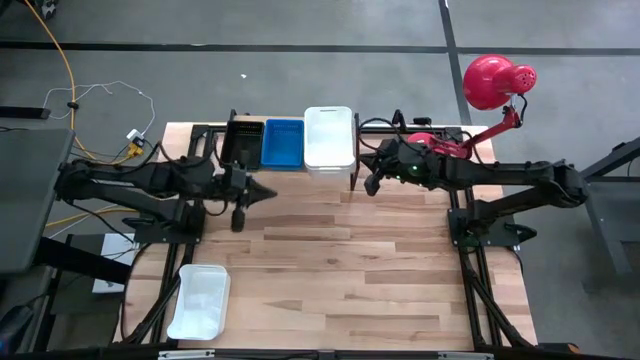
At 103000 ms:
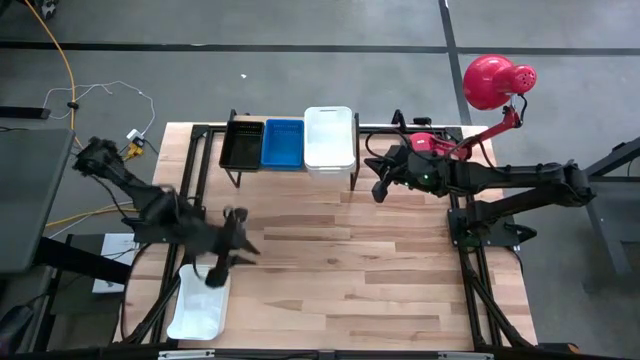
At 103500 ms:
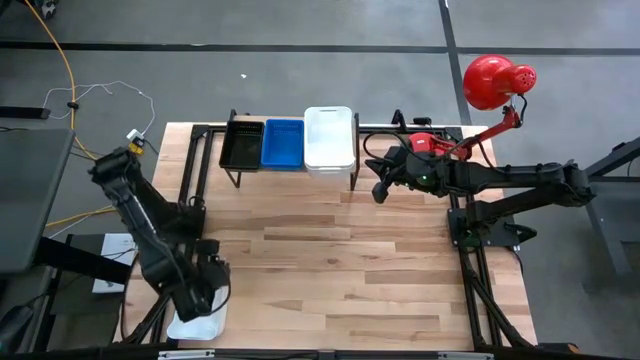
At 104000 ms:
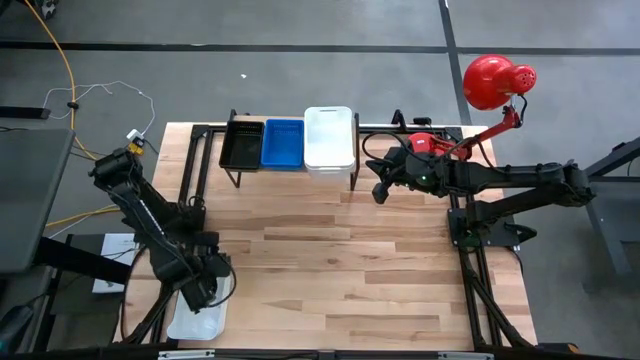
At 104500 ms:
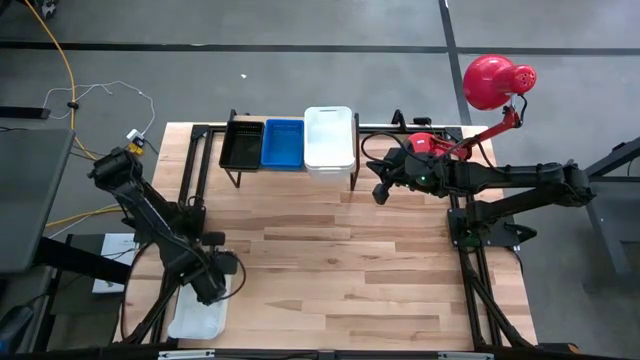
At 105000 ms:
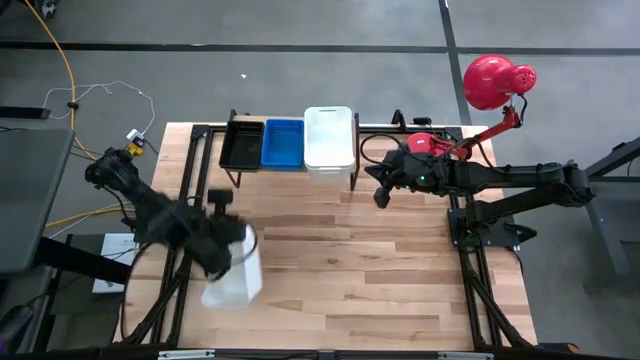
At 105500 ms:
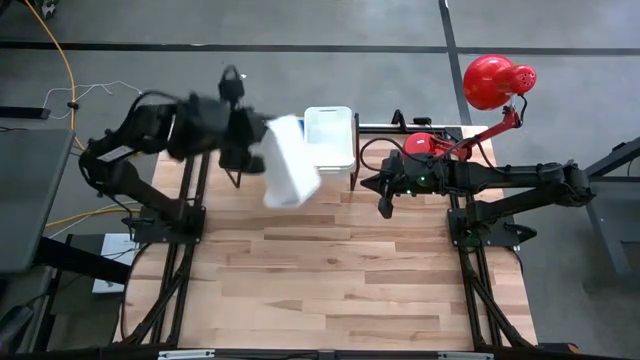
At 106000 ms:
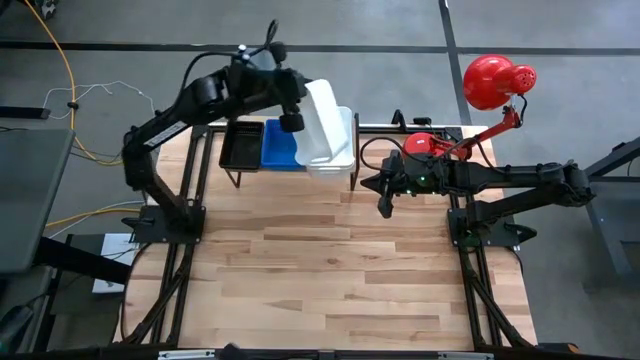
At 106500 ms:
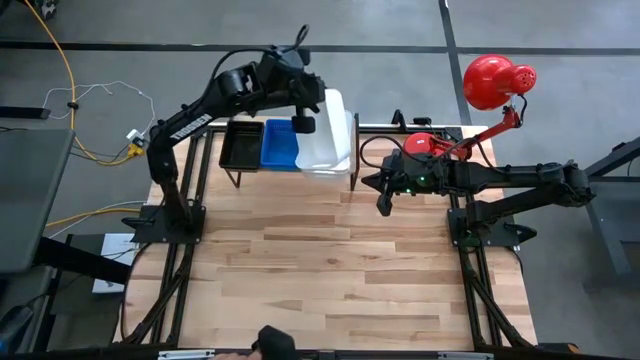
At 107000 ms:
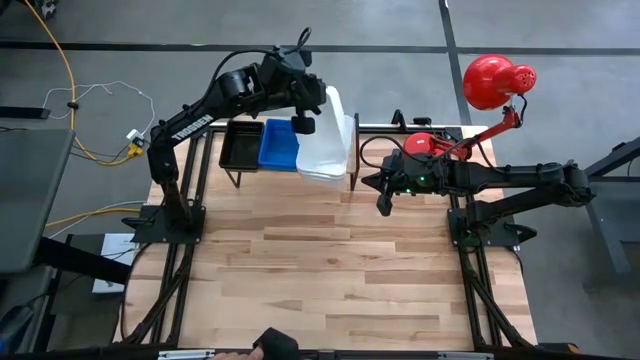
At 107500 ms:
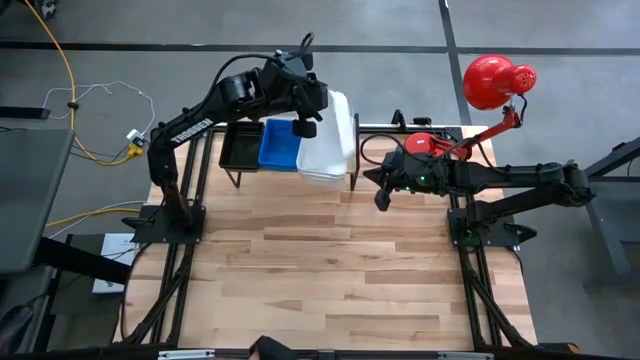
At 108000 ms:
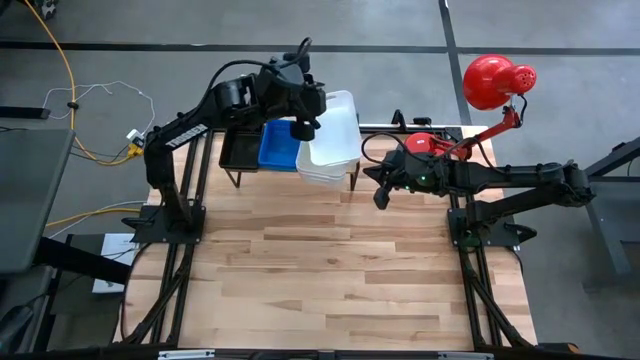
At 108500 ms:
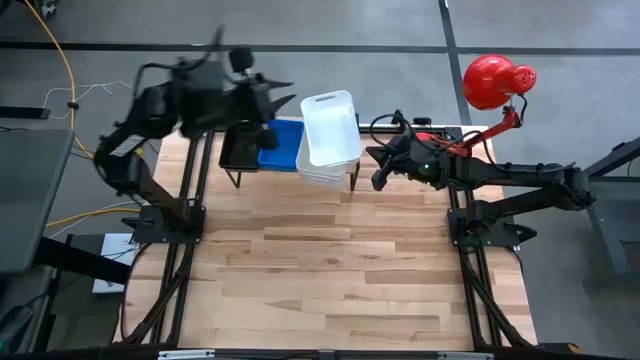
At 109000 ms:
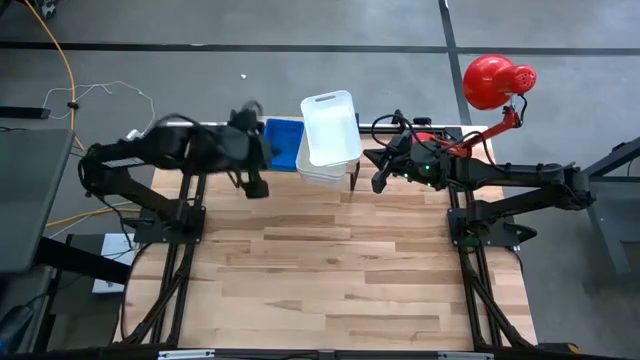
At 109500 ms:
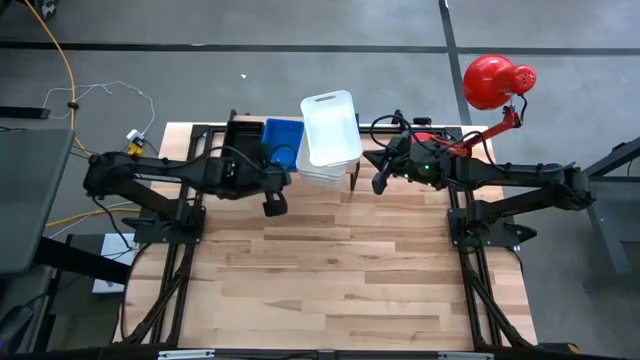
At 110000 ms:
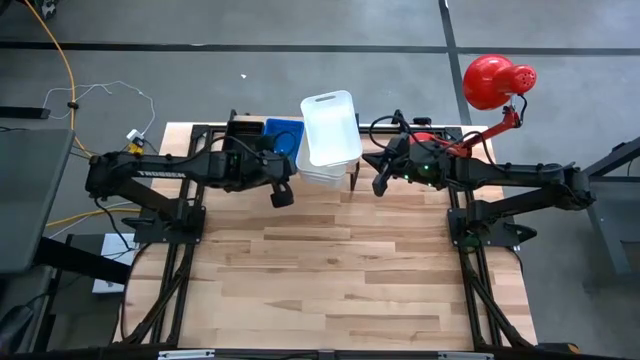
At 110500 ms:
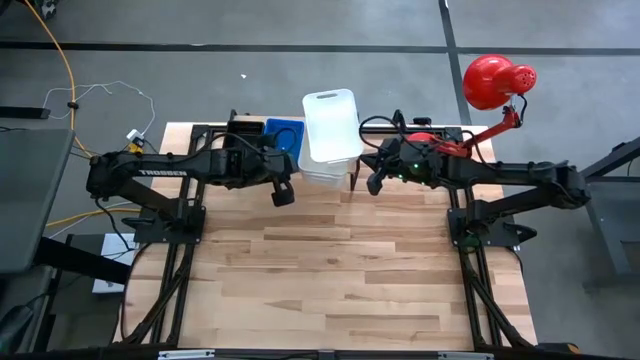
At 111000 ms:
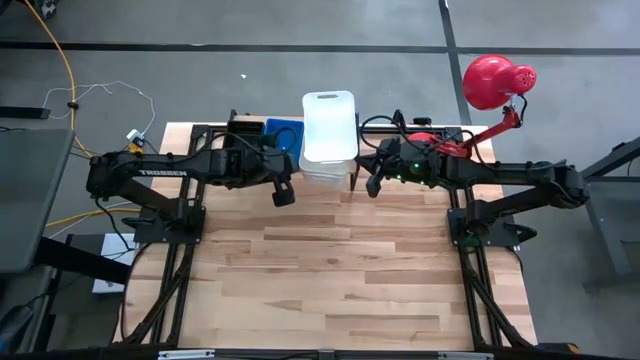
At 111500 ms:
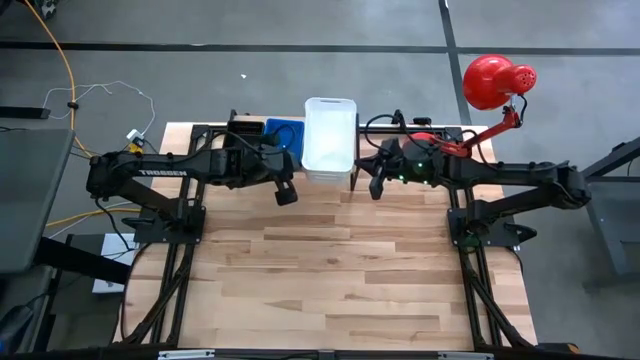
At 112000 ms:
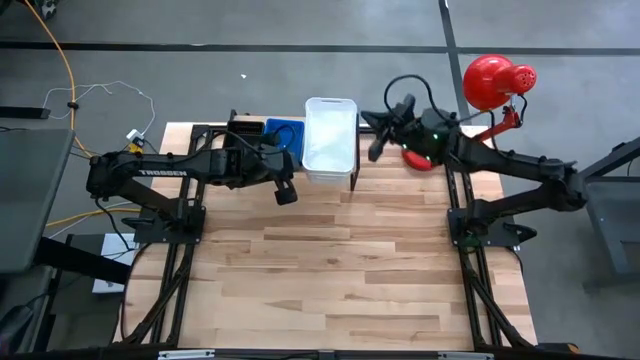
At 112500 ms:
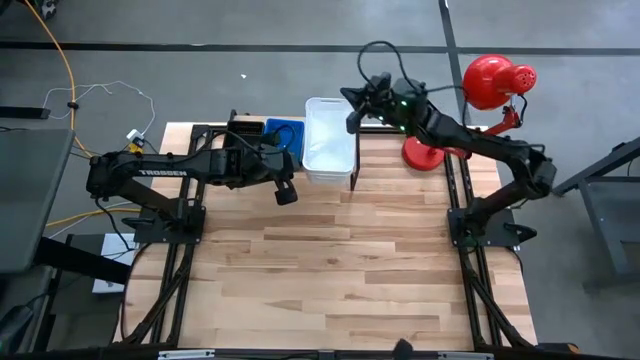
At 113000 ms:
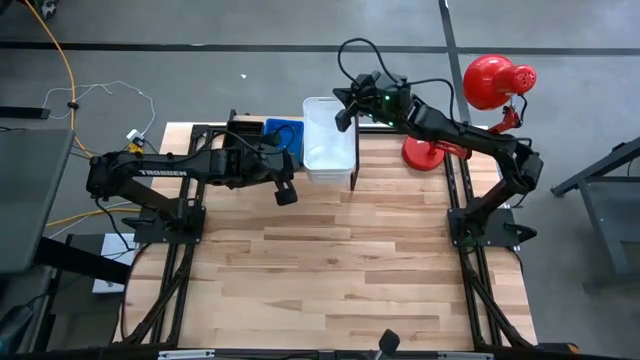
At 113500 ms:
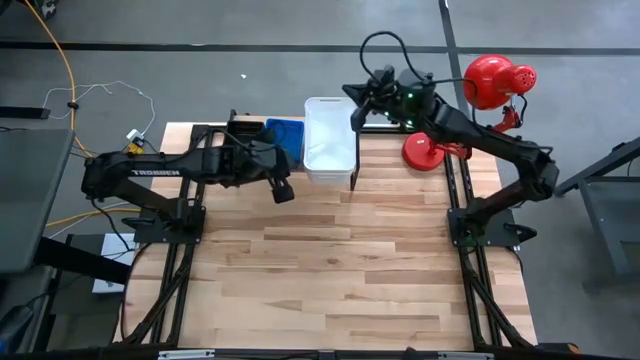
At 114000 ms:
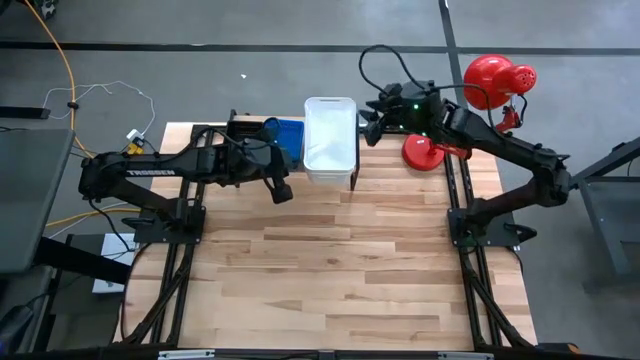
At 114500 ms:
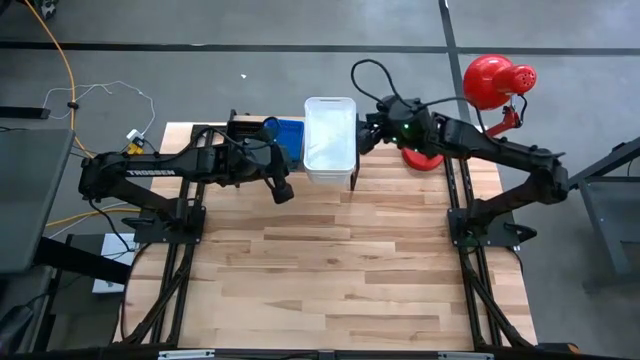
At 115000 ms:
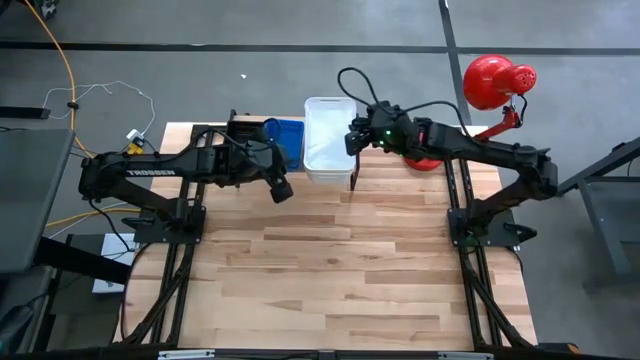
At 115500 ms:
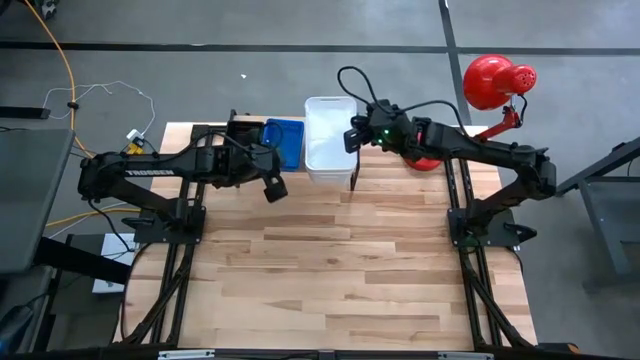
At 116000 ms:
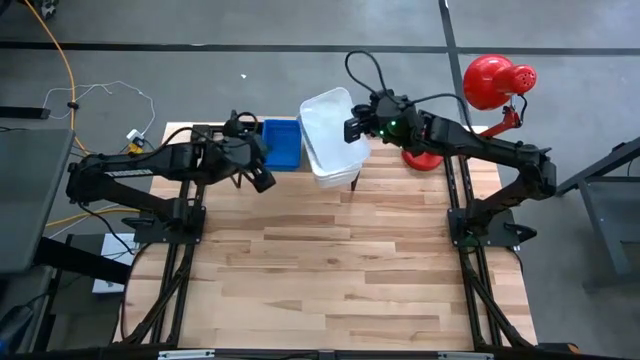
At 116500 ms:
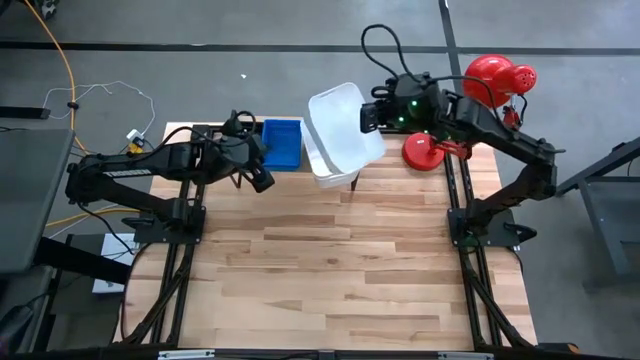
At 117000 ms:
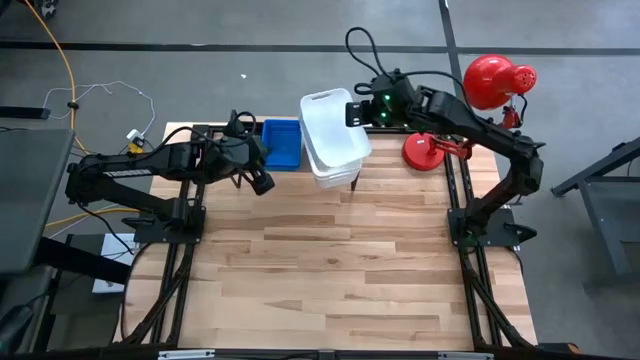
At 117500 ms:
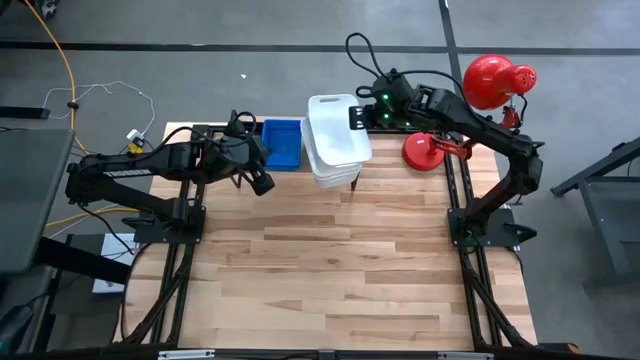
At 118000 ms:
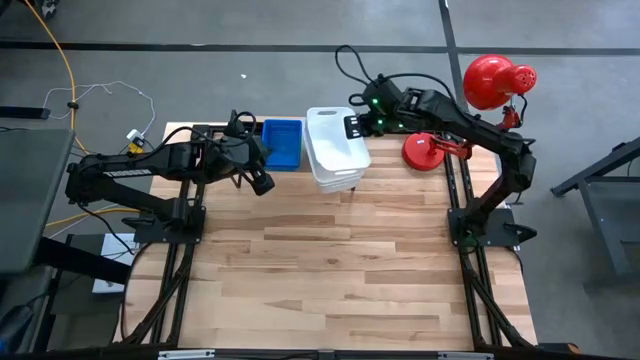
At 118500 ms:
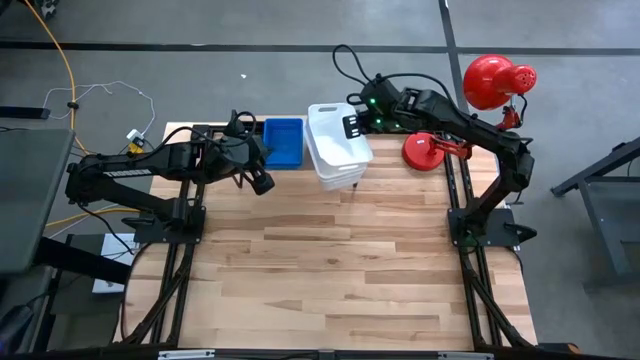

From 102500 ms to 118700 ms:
Task: Stack baskets on shelf by color
Stack the white bin on the white bin on the shelf

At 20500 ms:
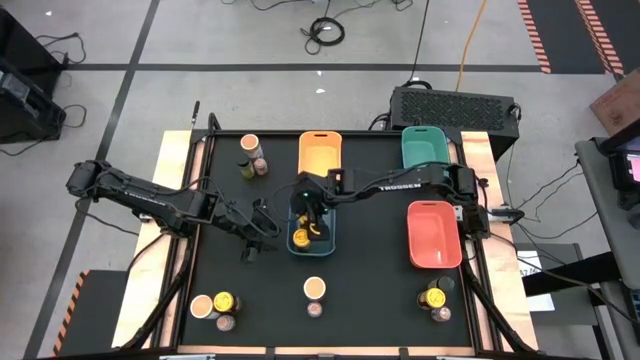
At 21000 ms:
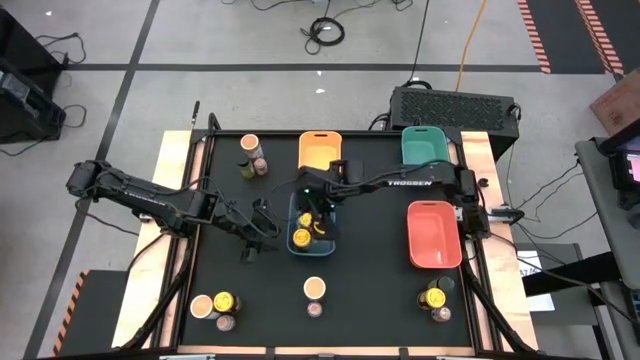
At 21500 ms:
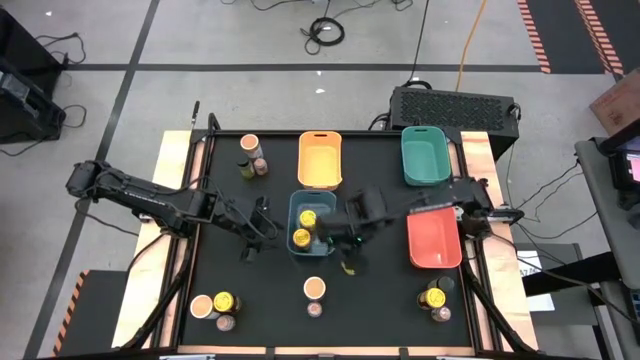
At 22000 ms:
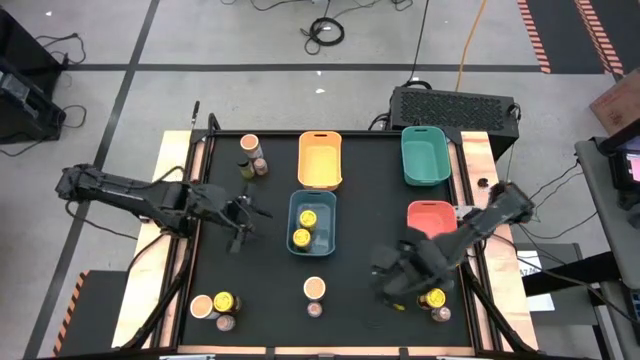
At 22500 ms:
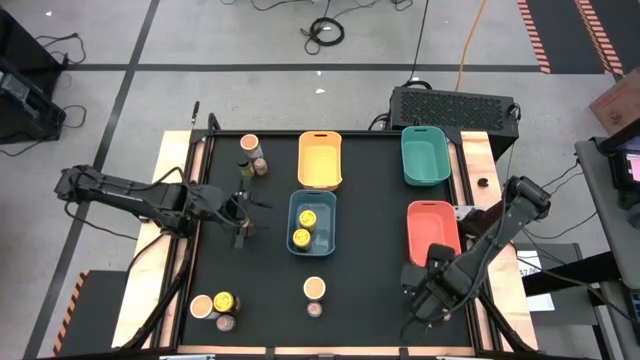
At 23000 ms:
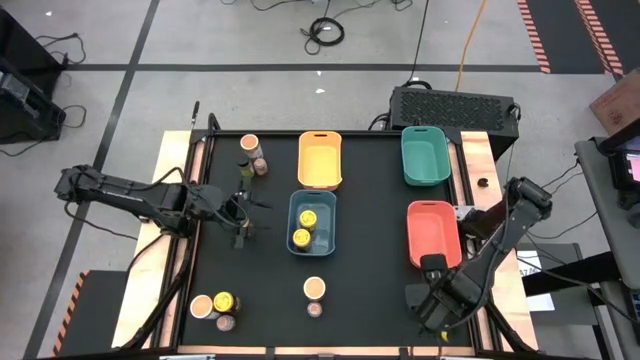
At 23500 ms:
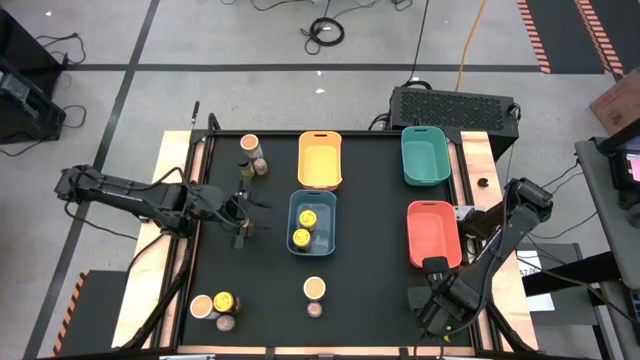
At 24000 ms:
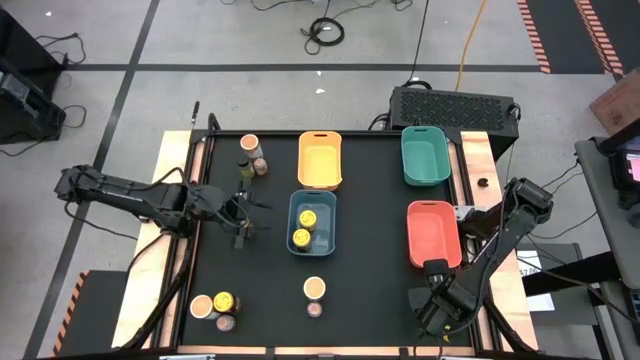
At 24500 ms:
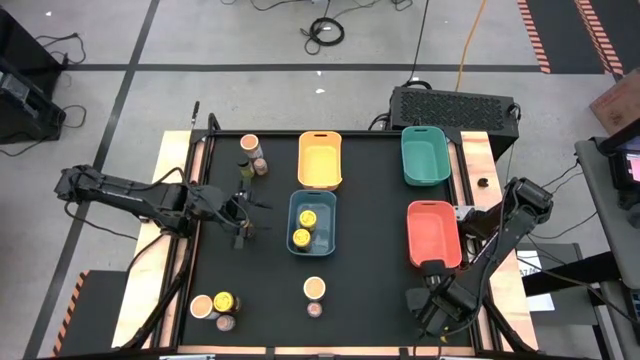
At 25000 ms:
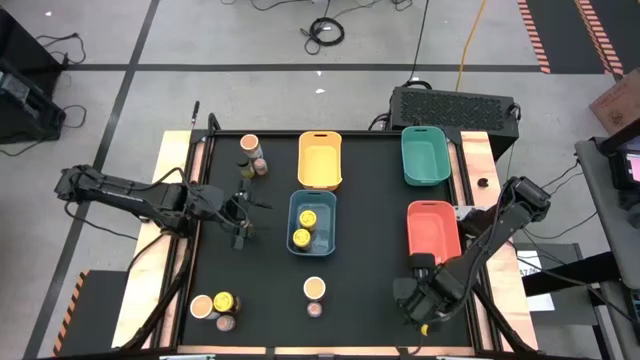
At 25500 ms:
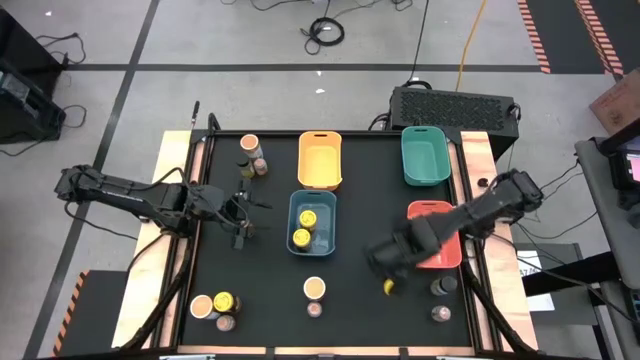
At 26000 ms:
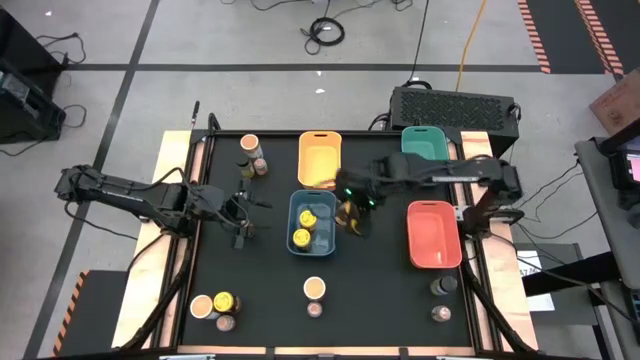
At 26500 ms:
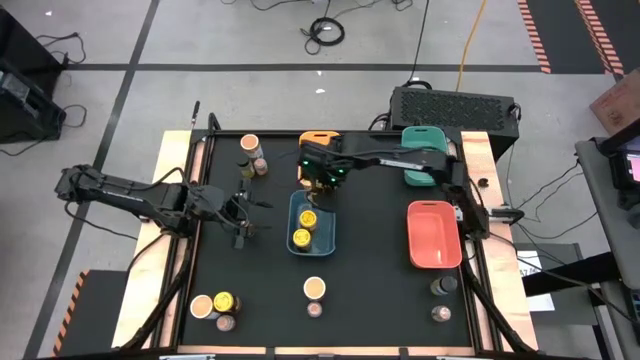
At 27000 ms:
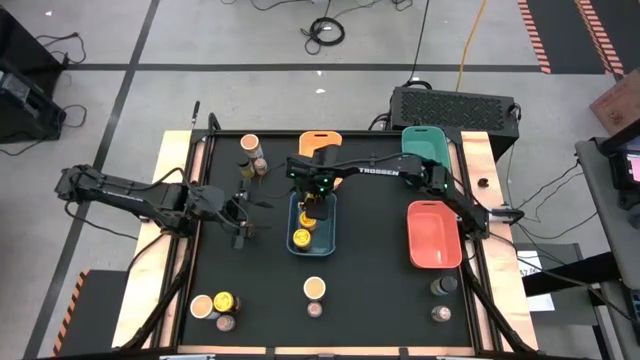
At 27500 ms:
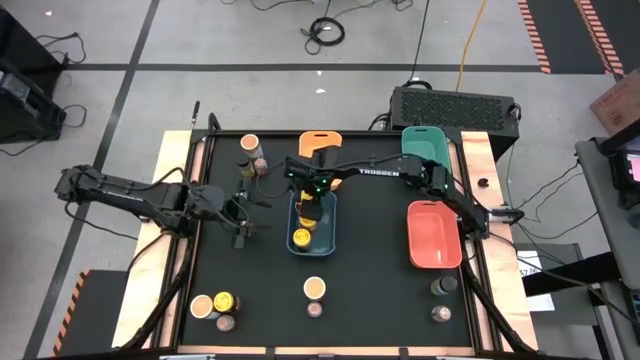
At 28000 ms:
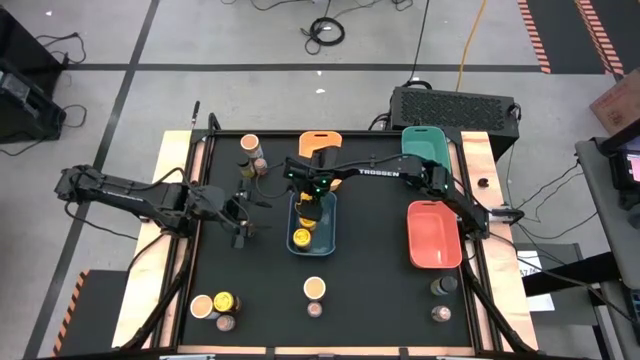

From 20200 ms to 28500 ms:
Task: Sort spices by type
Put the yellow seasoning bottle into the dark blue bin
